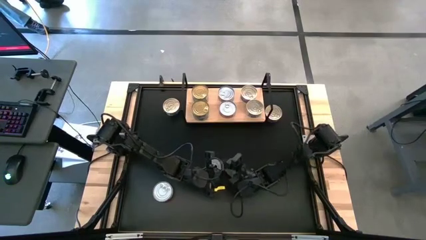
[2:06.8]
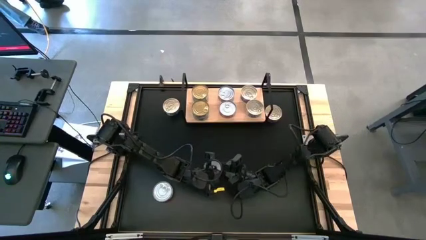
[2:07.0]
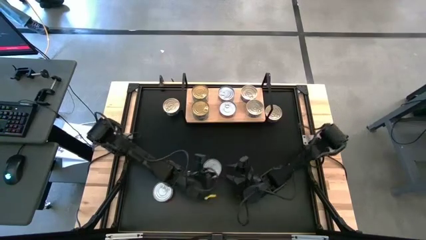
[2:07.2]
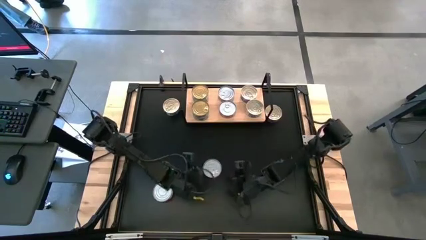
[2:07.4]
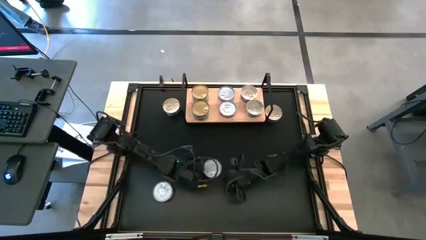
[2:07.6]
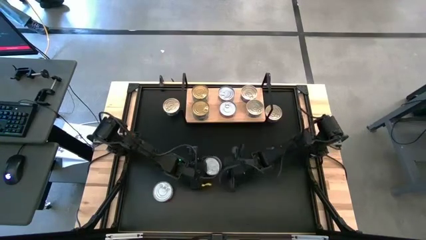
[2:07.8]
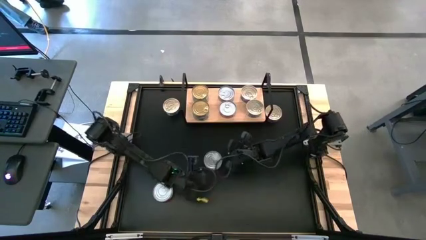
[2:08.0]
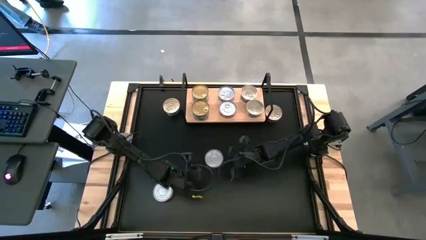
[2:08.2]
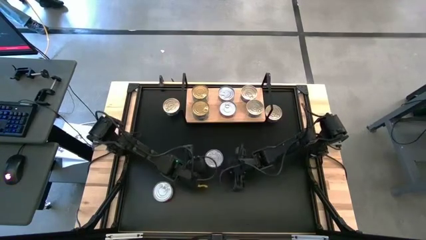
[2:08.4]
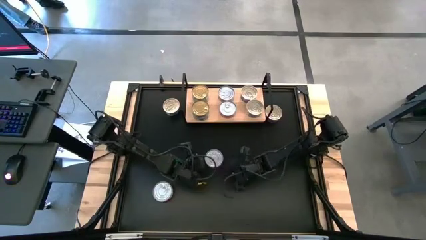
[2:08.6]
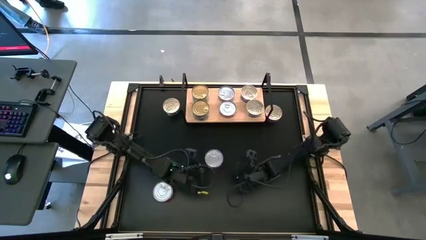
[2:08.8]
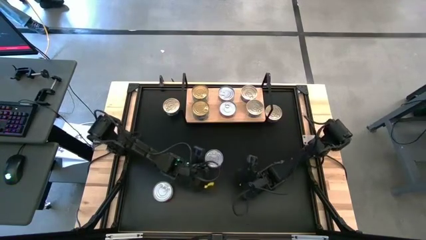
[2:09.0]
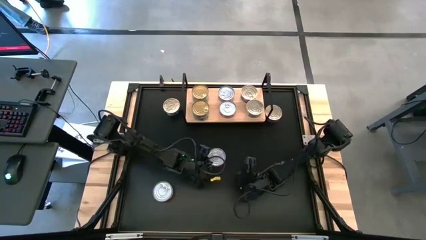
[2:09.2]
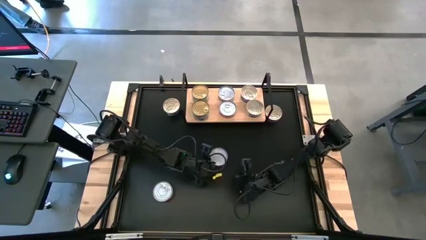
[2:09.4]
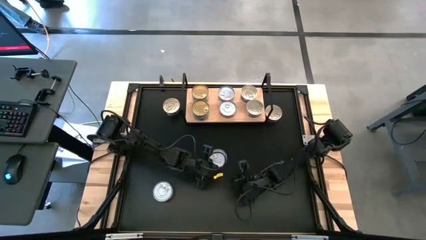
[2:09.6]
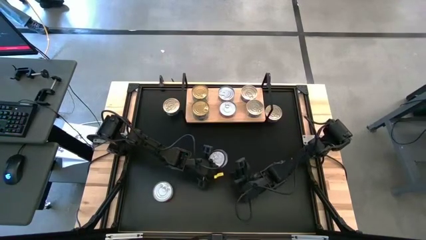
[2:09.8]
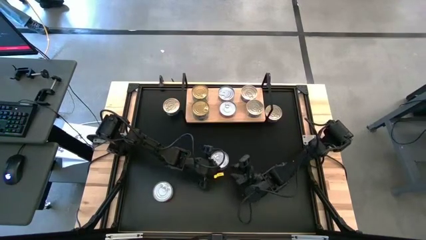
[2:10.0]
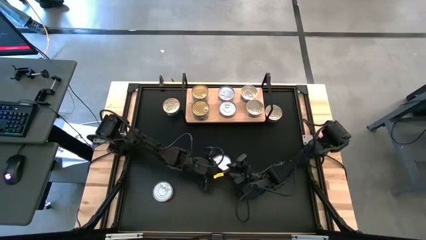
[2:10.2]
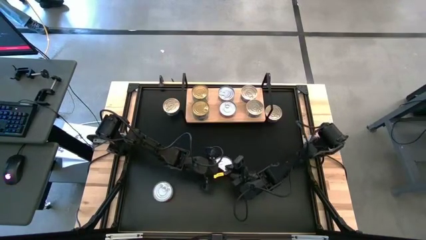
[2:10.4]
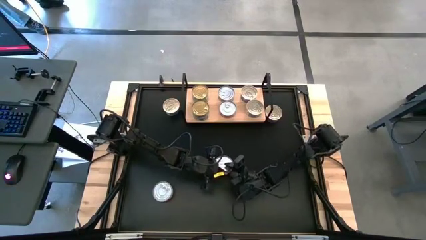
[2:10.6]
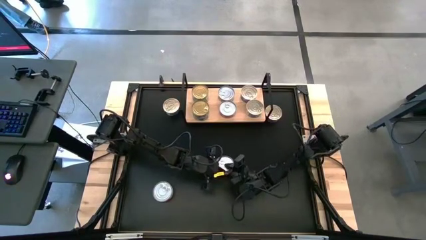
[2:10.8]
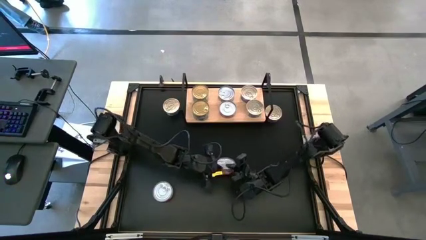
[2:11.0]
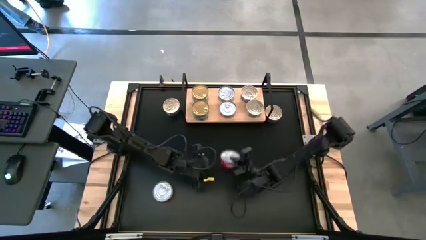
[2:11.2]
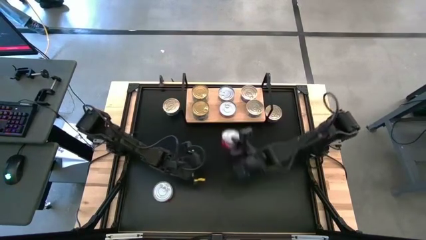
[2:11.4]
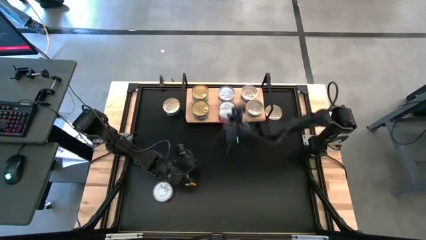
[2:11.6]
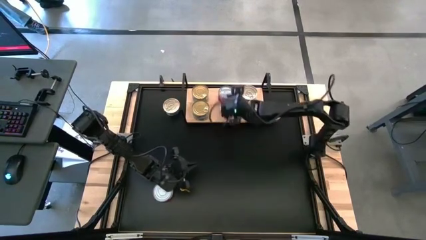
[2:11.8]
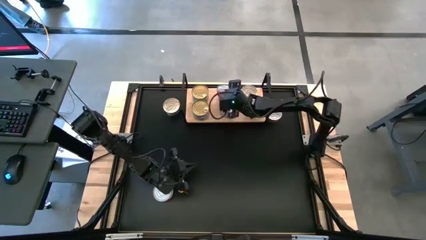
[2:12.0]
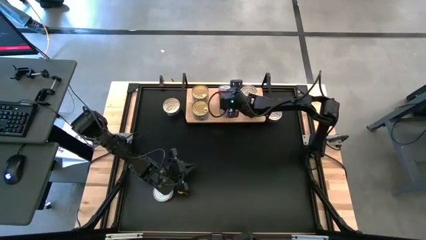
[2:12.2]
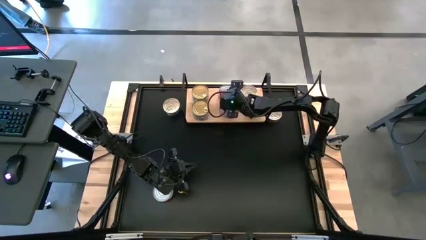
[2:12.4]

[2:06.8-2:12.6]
Task: Stack canned seafood by type on shelf
Stack the red tuna can on top of the red tuna can

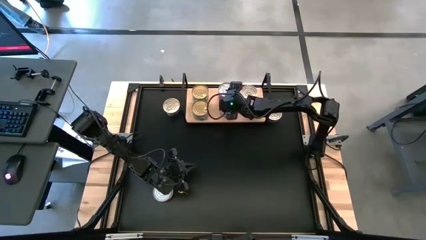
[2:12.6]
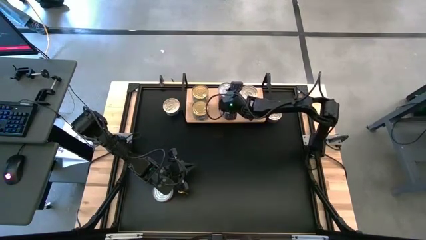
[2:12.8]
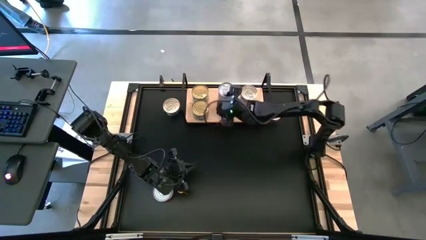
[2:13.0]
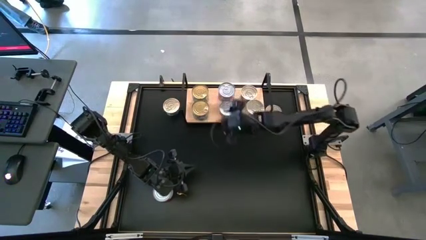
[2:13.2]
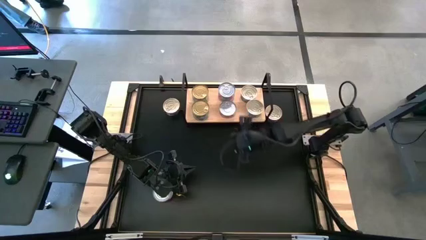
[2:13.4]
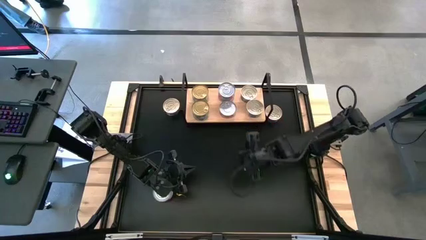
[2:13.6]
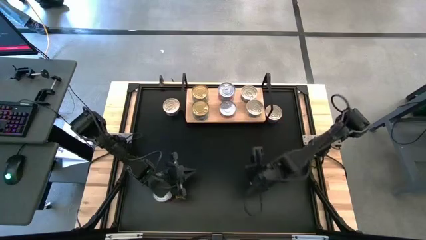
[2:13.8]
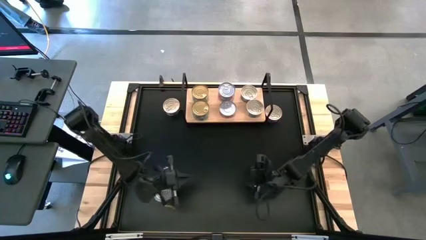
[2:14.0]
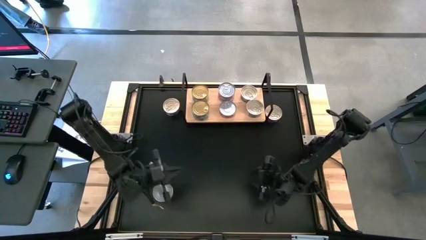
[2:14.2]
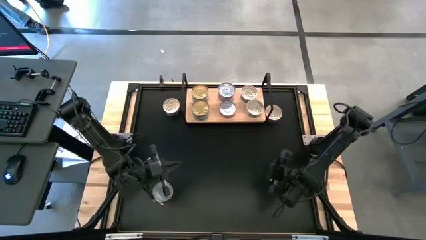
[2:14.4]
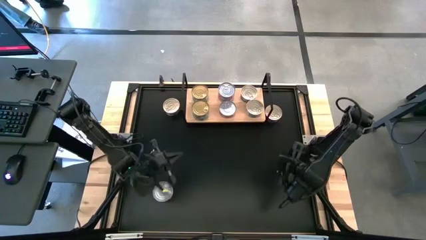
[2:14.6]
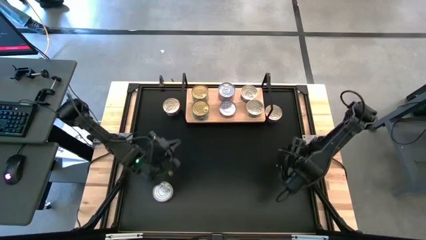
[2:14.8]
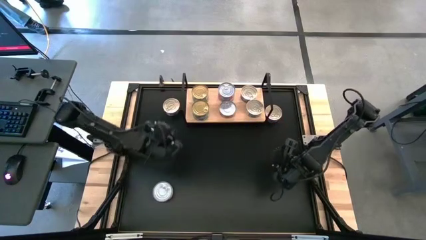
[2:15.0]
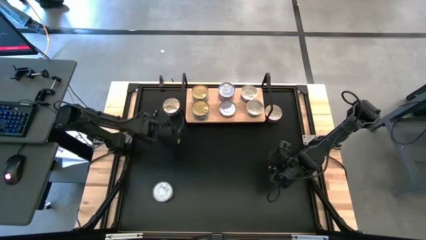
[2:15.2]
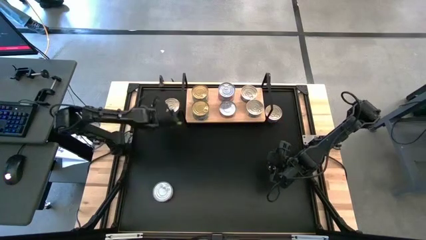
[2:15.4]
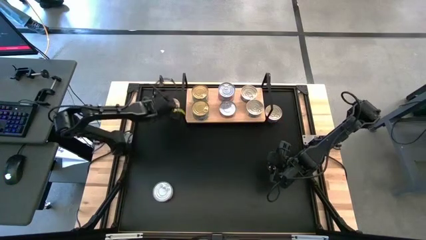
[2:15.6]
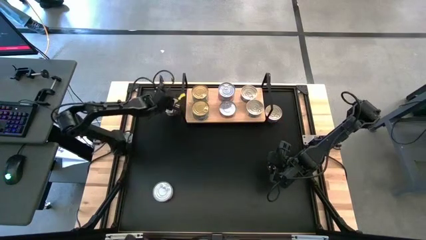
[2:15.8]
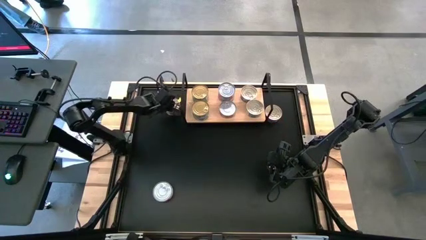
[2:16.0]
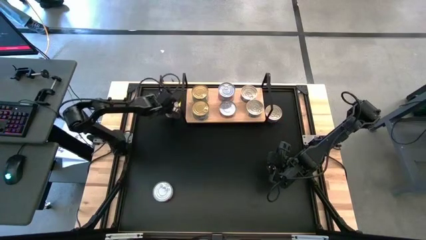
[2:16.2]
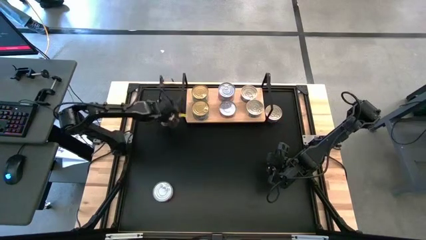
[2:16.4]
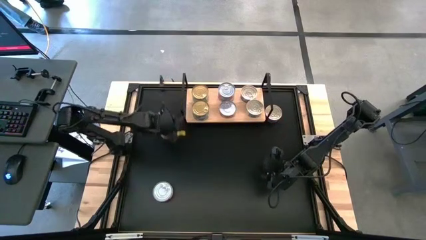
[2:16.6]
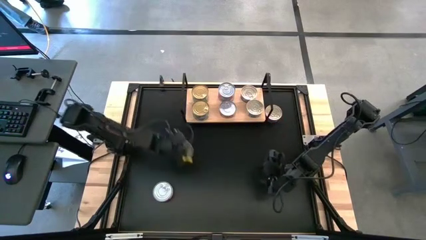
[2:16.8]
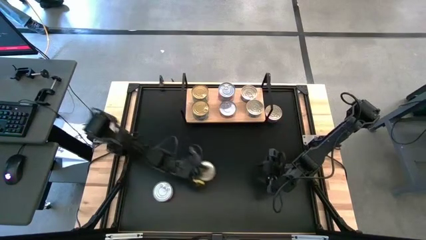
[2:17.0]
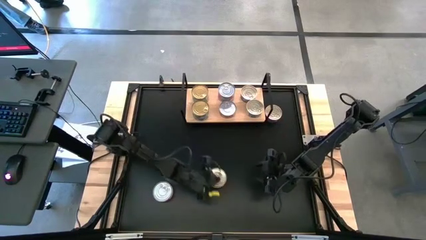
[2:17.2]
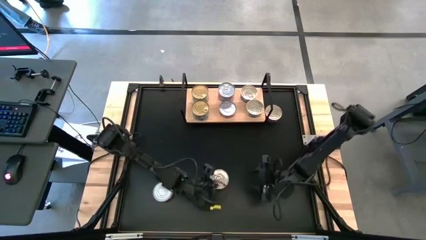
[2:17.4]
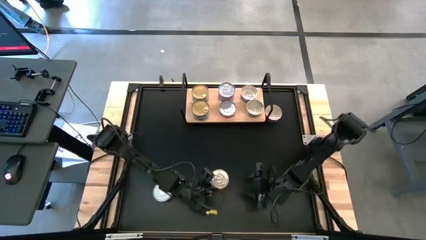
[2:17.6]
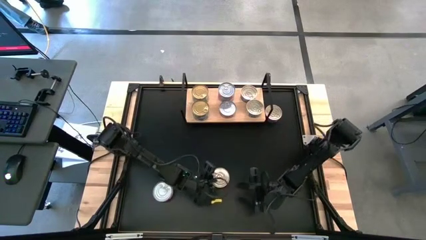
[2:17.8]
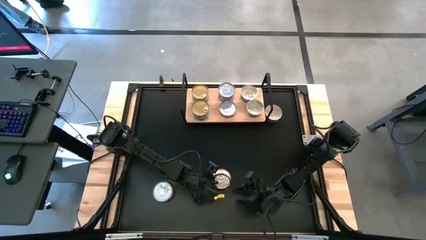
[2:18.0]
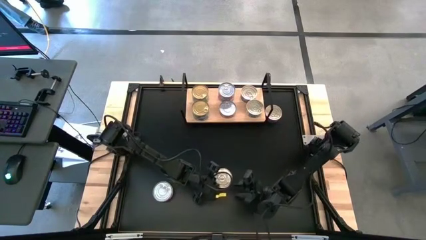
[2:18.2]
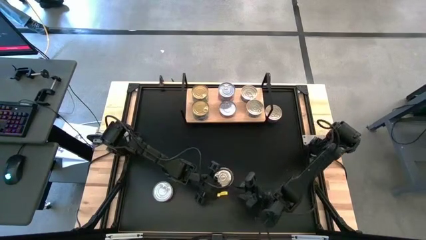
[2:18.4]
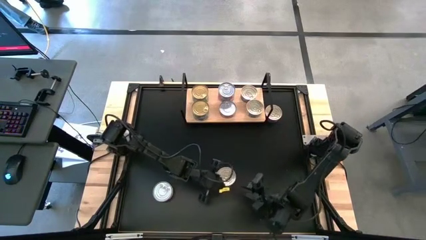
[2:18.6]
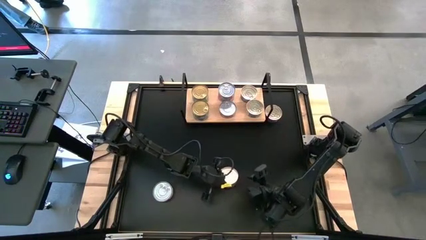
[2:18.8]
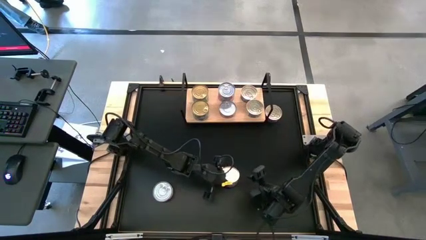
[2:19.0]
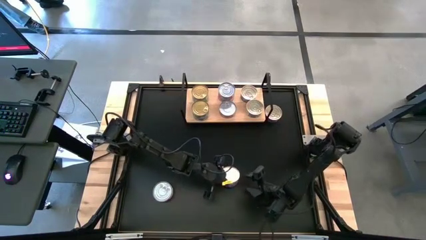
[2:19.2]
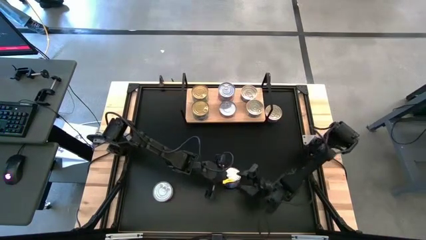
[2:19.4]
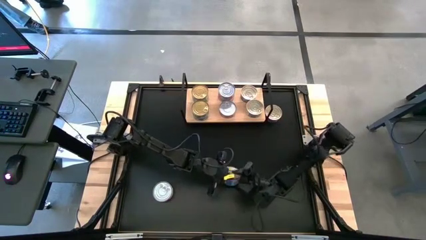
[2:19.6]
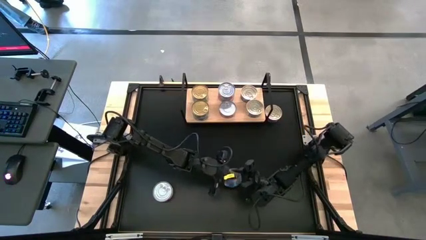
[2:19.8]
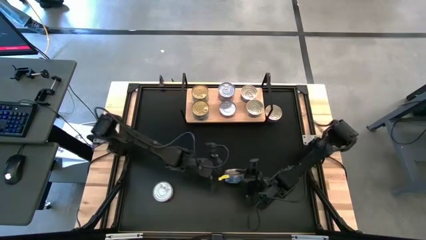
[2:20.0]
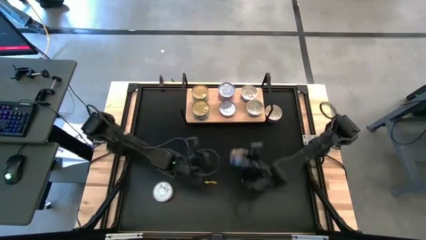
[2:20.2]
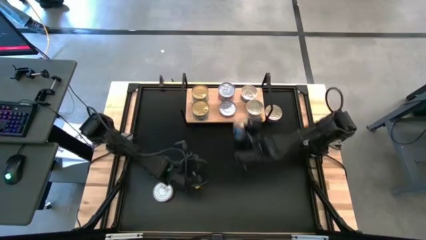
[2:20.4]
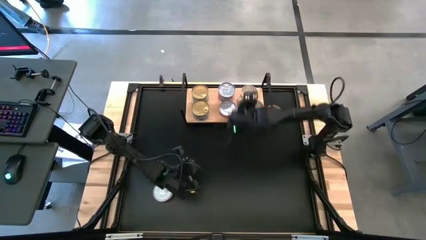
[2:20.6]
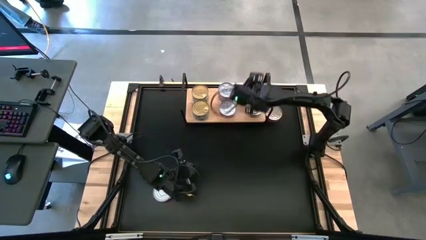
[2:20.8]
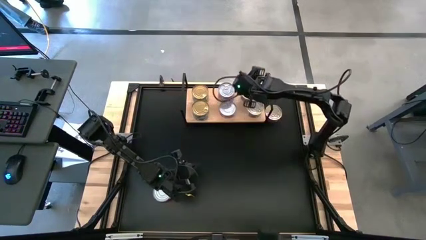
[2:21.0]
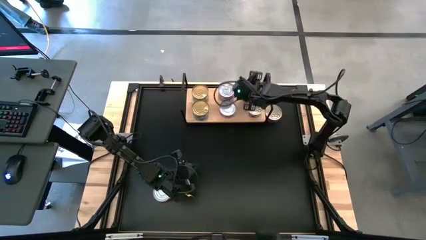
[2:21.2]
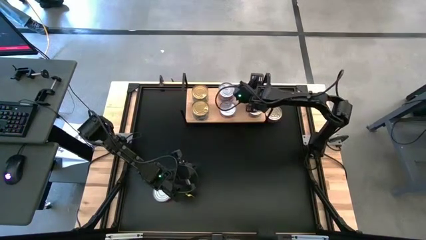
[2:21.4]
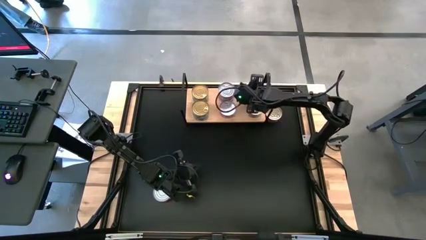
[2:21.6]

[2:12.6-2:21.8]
Stack the blue tuna can on top of the blue tuna can
